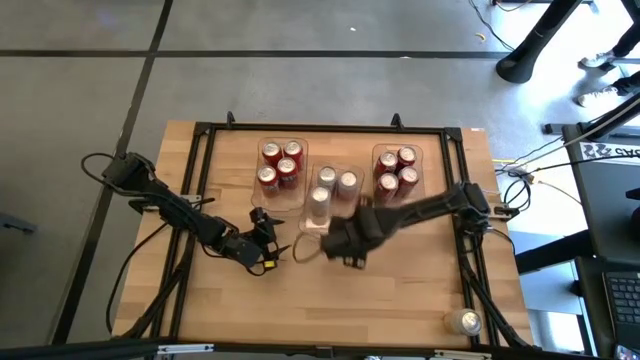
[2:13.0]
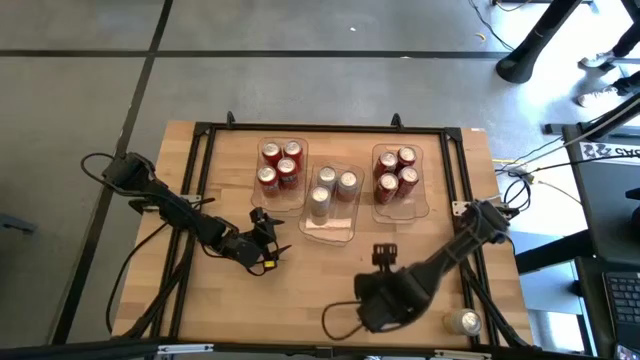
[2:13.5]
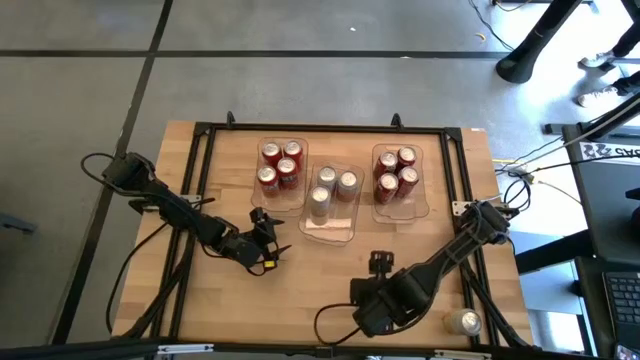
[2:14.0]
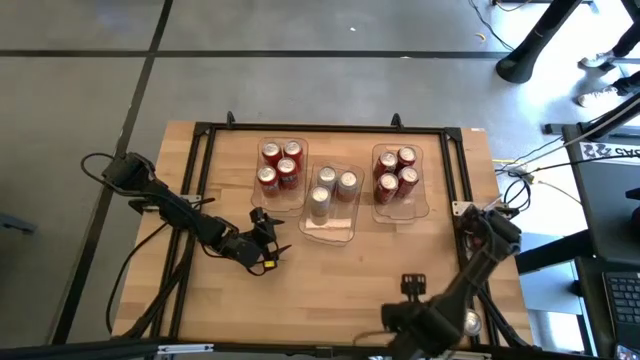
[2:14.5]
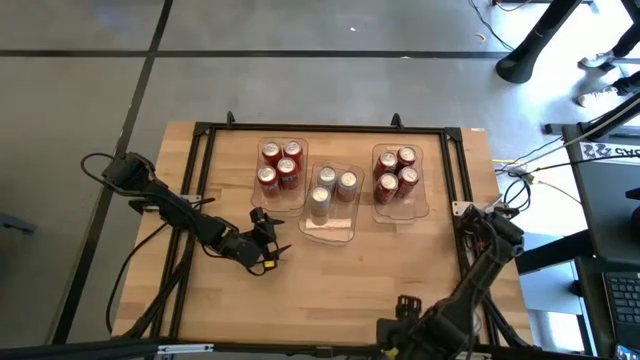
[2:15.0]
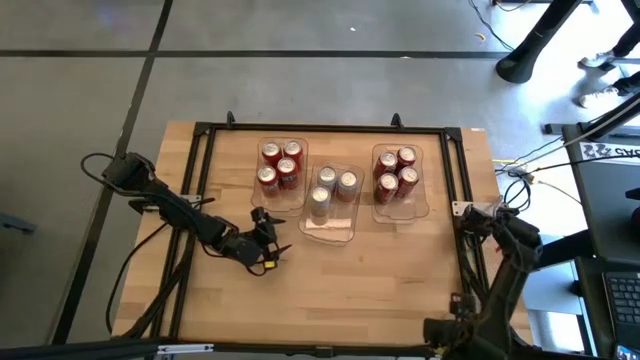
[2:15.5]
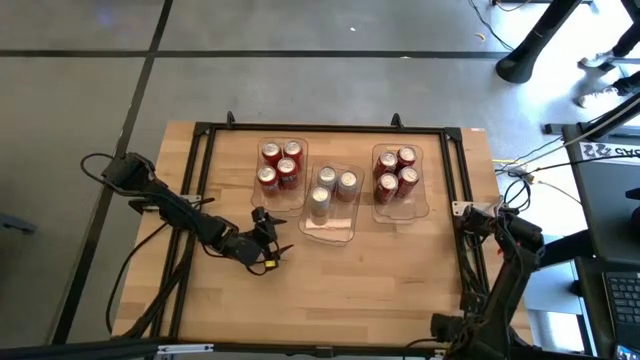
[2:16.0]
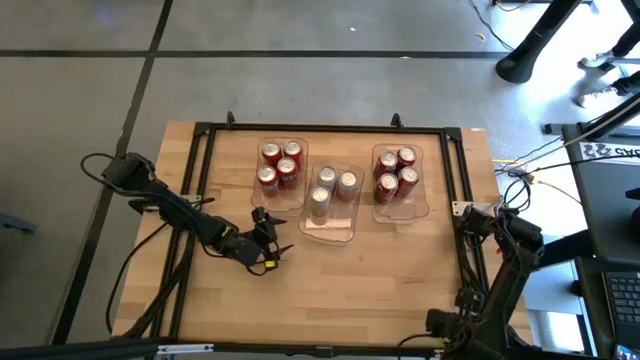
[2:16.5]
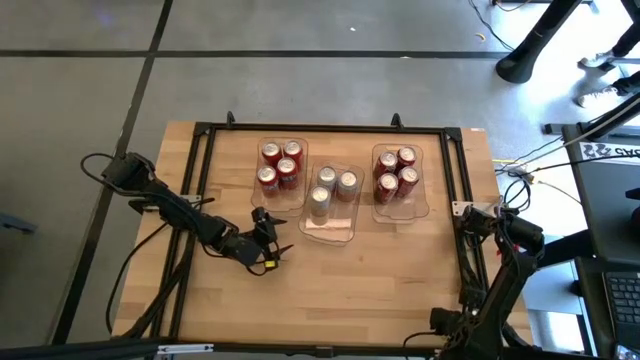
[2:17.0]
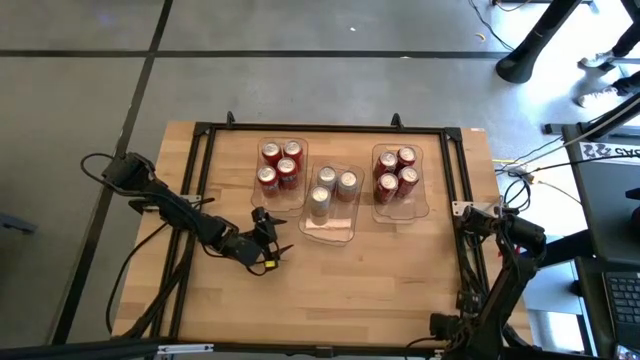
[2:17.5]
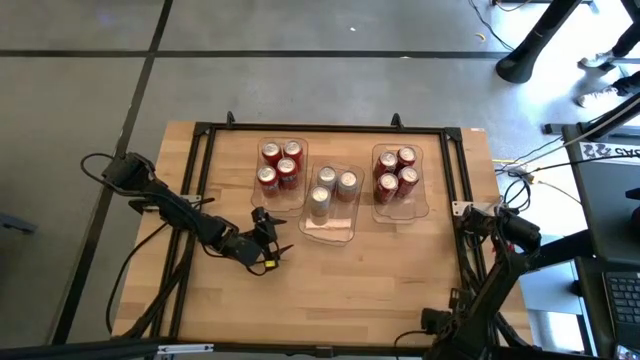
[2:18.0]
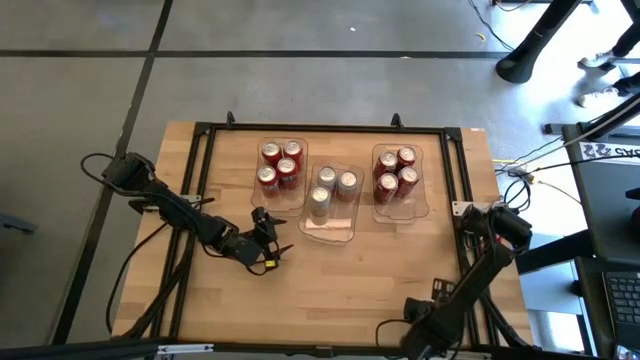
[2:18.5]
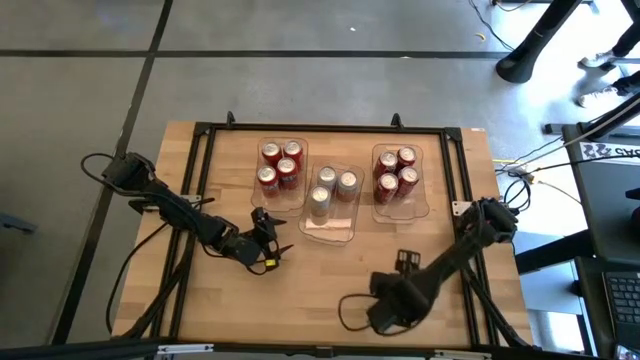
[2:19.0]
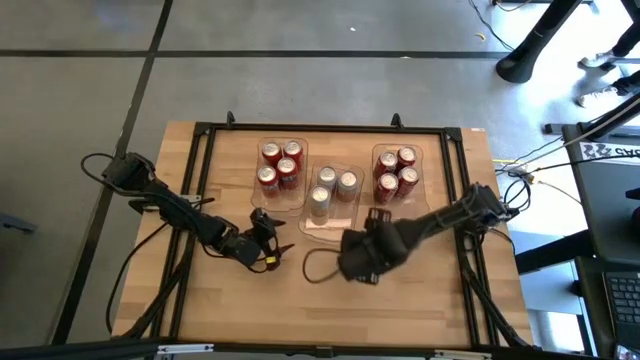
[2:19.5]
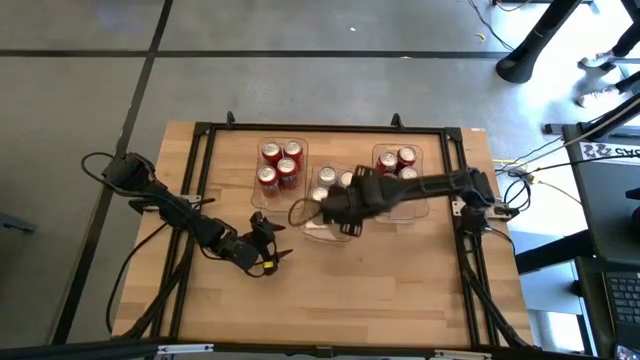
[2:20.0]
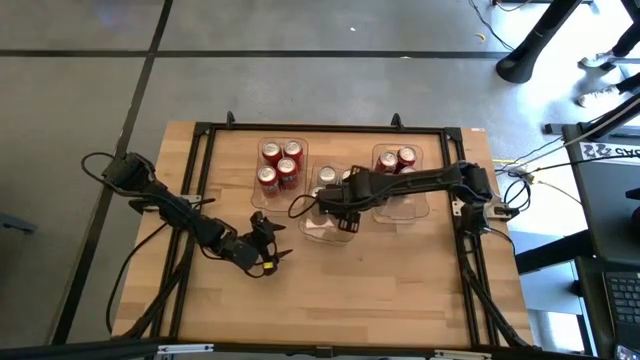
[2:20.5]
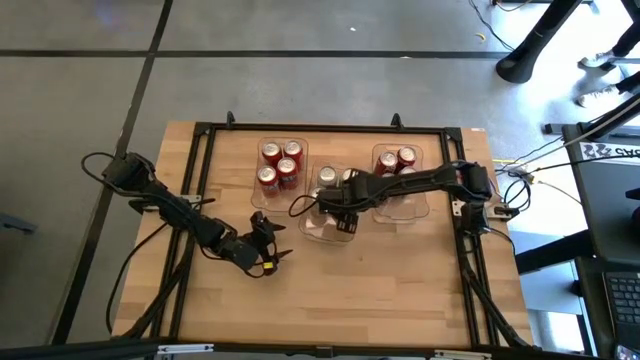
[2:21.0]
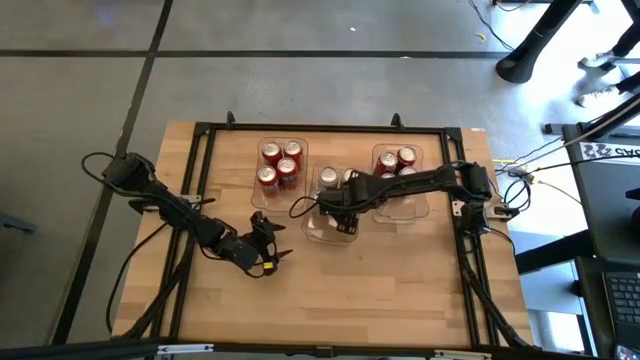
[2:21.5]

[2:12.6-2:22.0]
Task: Sort soda cans
Put the yellow white soda can into the center transparent bin

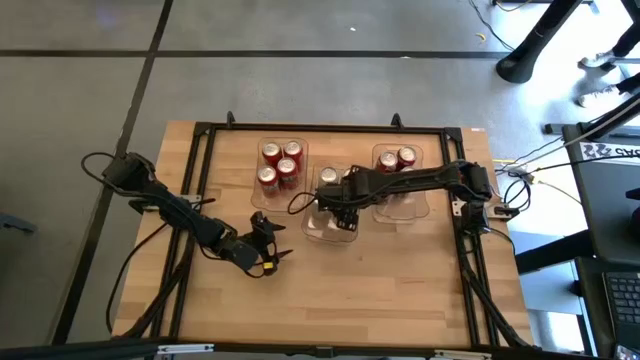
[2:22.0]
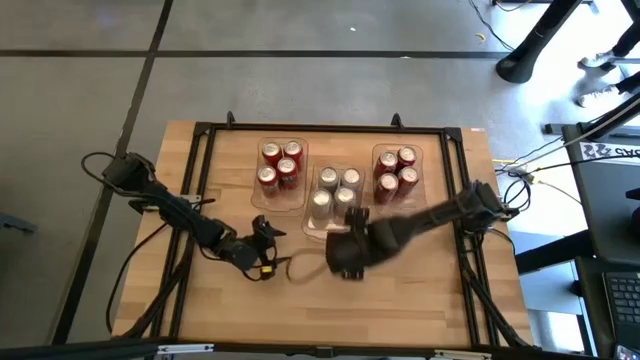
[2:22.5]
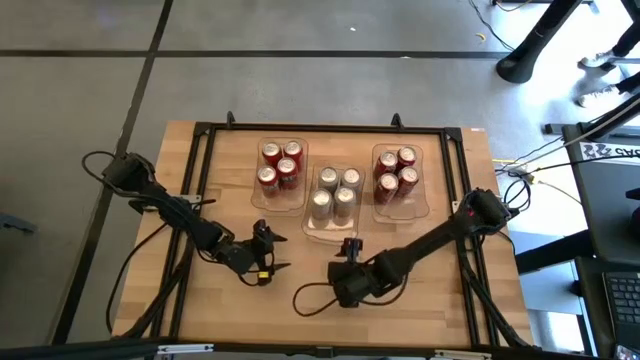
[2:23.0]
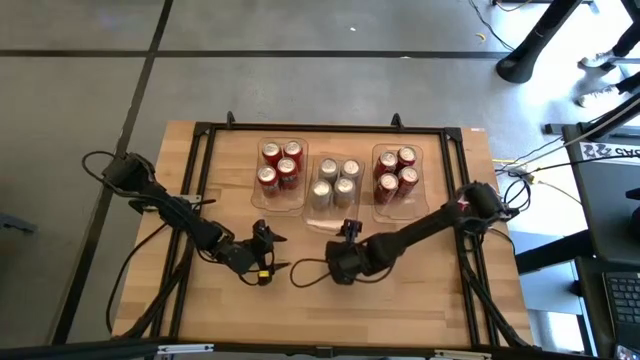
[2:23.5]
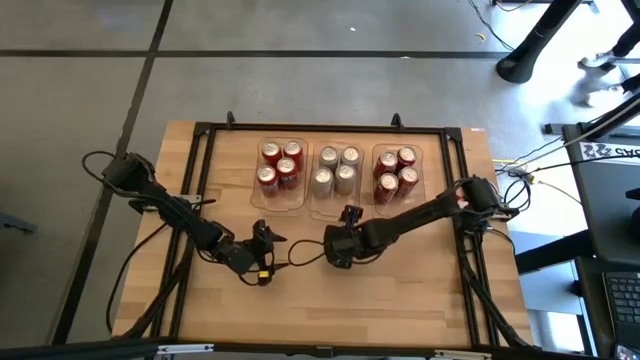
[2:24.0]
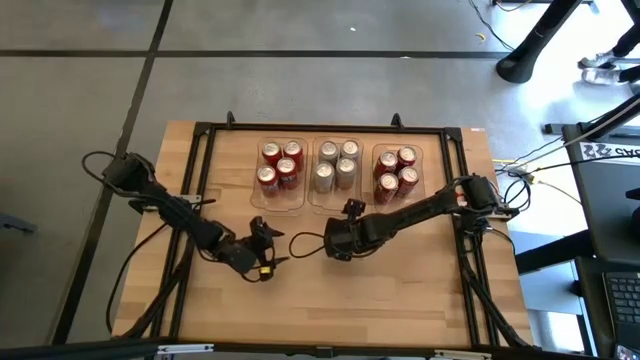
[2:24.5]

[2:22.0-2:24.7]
Adjust the center transparent bin

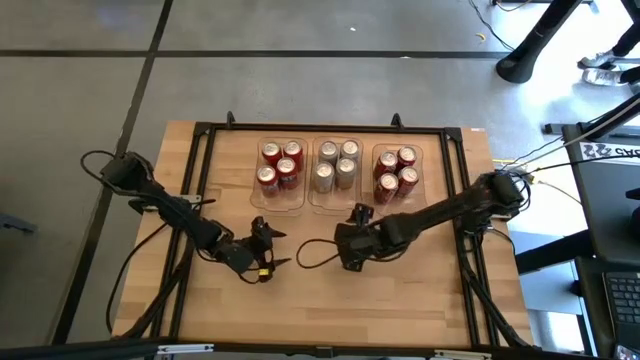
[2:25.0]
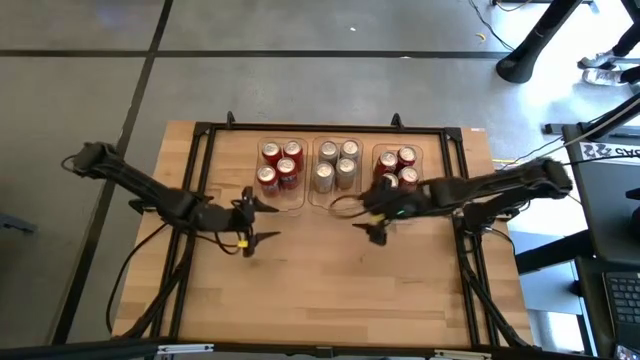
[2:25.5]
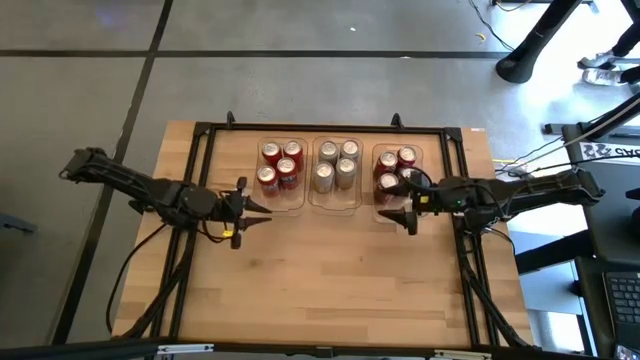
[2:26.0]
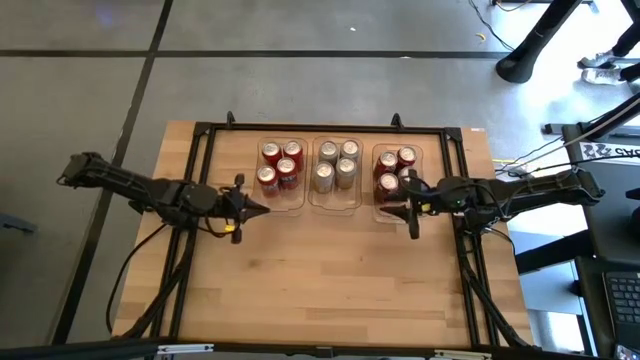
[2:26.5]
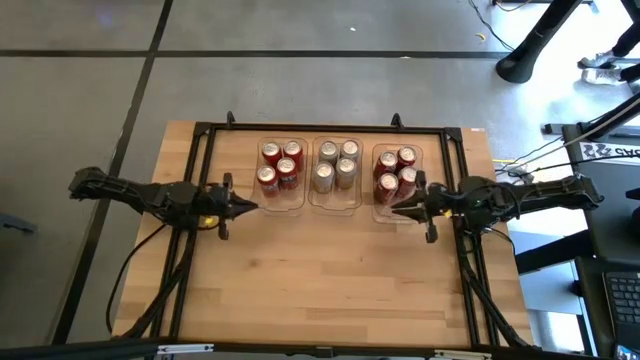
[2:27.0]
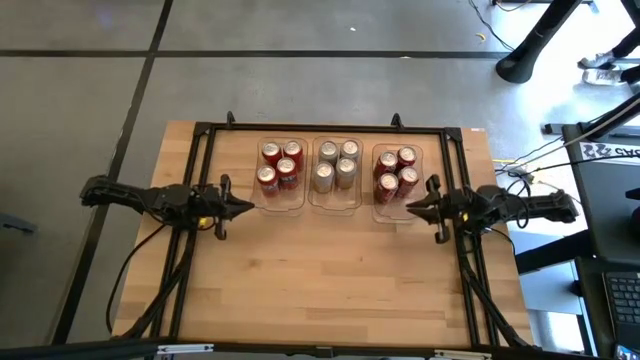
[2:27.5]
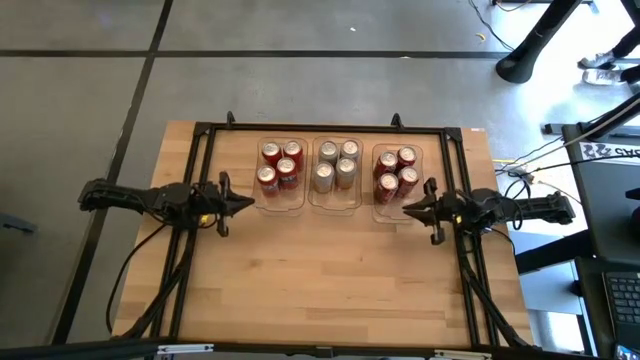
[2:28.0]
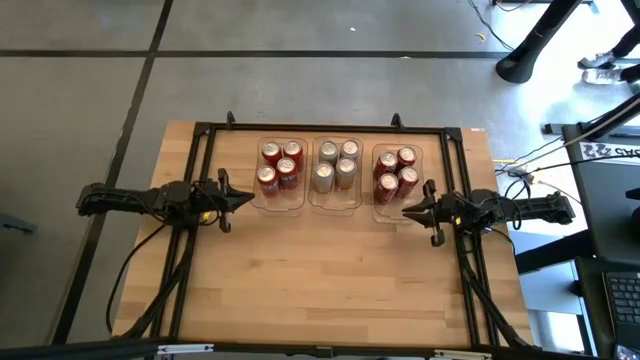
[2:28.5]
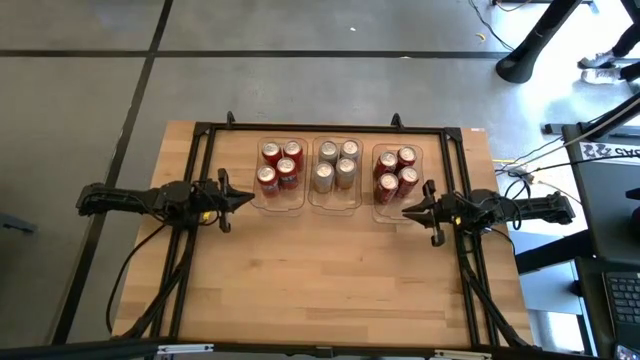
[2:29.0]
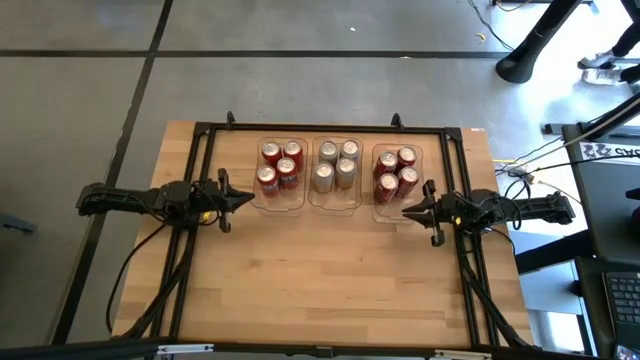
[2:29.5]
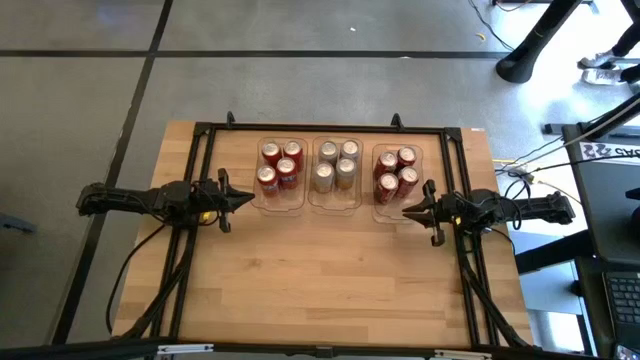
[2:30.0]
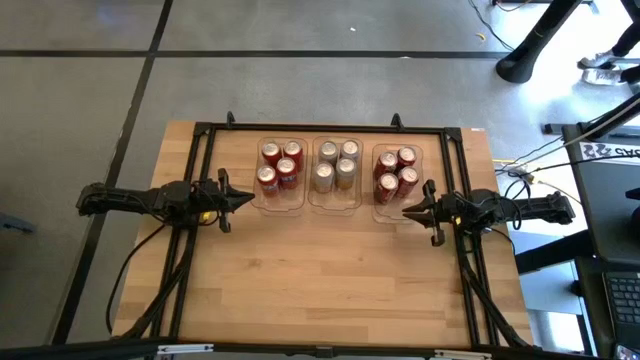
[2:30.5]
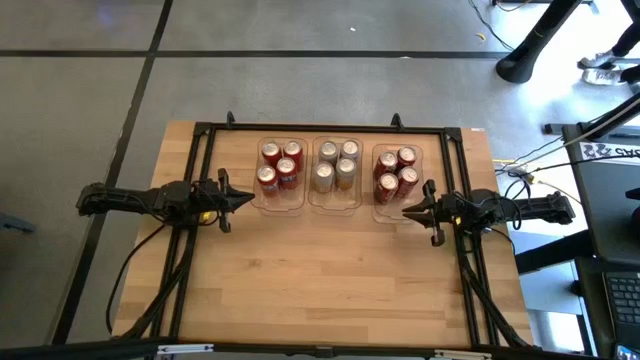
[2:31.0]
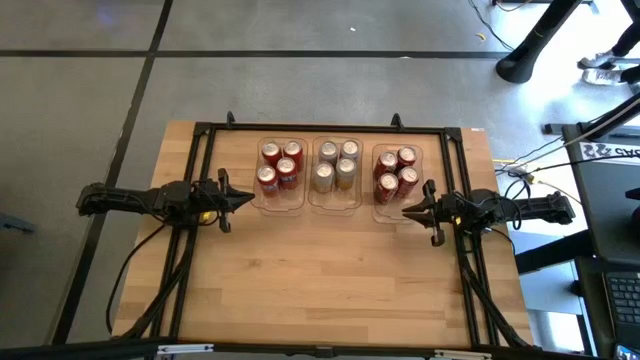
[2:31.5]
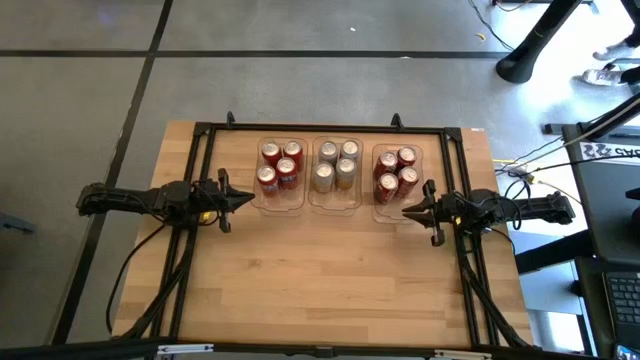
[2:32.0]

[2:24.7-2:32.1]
Return to Home Position

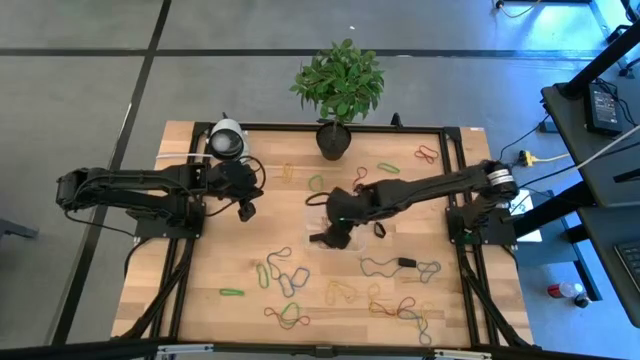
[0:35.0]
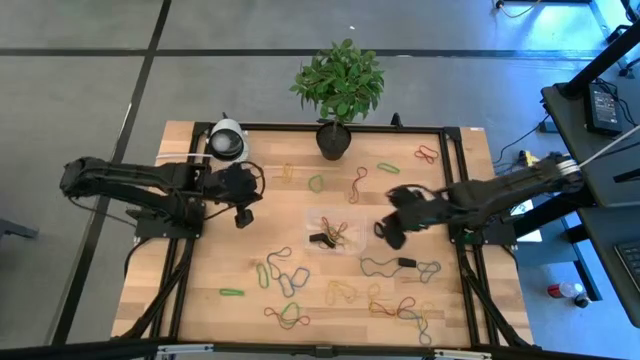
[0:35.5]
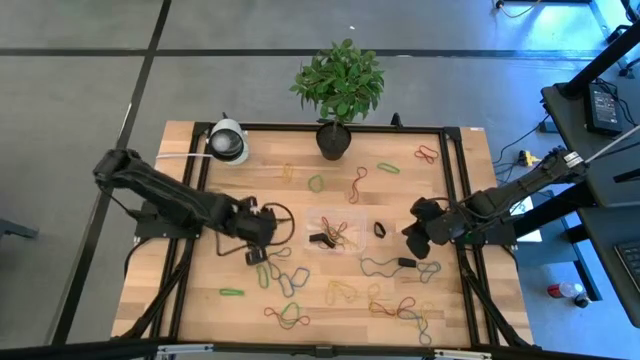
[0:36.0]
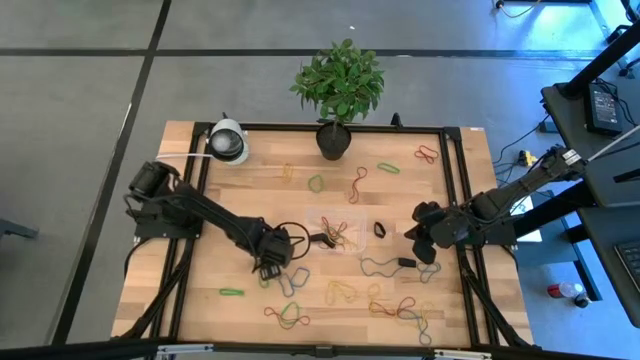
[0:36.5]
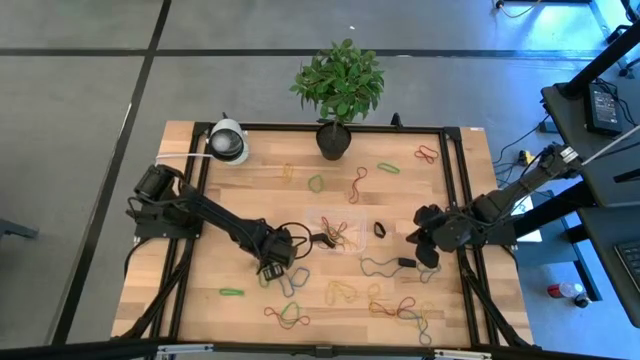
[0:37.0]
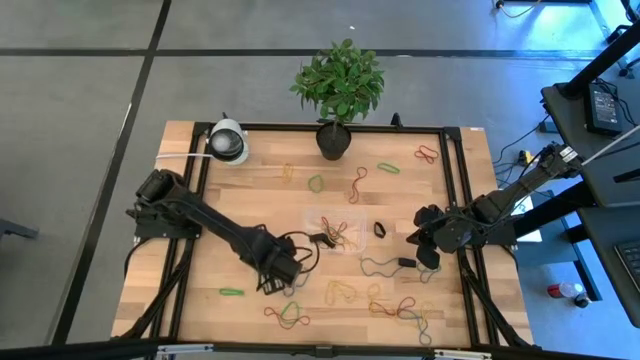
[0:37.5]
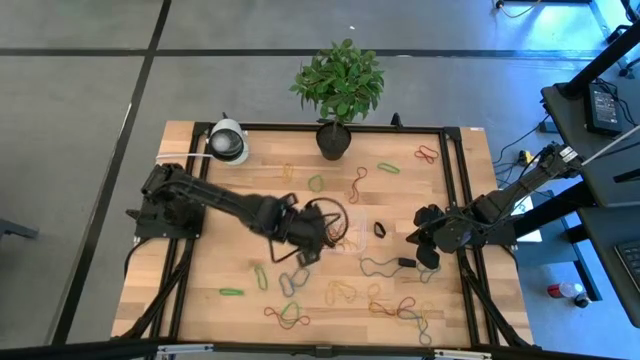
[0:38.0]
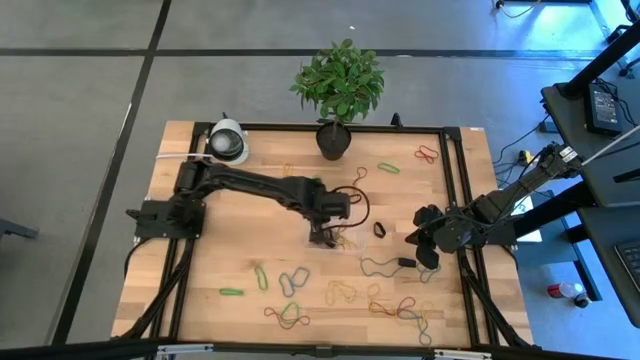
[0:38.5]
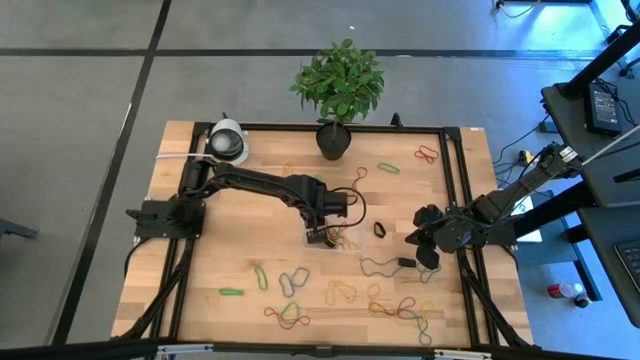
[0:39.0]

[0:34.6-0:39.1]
Task: Pick and place rubber bands into bin
Put the blue rubber band into the bin
